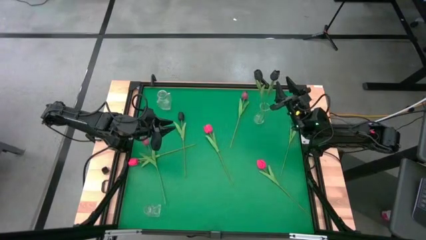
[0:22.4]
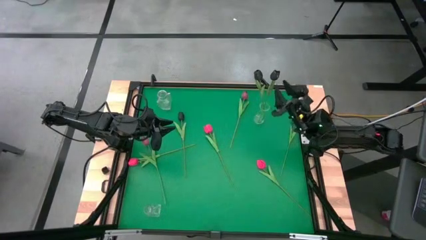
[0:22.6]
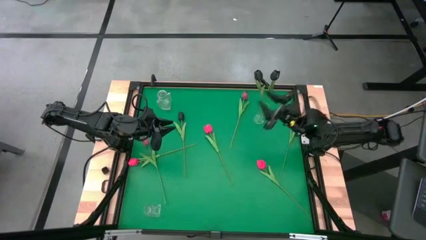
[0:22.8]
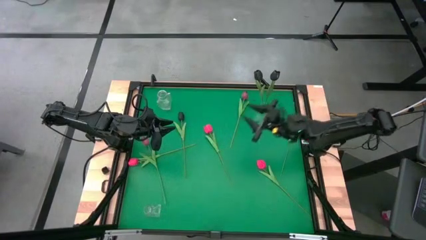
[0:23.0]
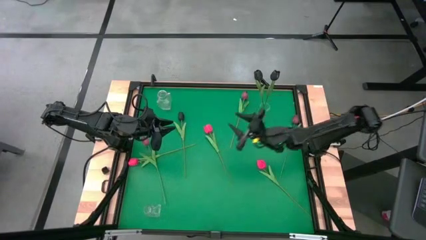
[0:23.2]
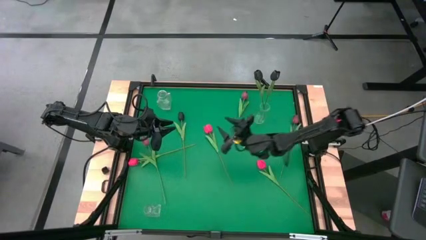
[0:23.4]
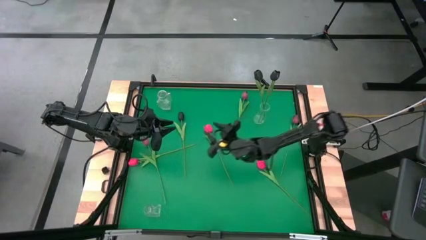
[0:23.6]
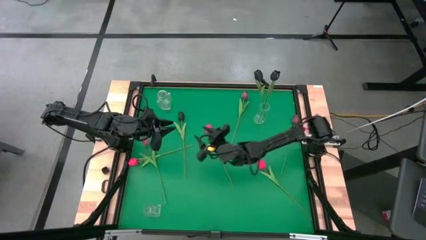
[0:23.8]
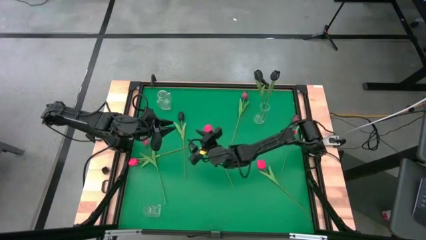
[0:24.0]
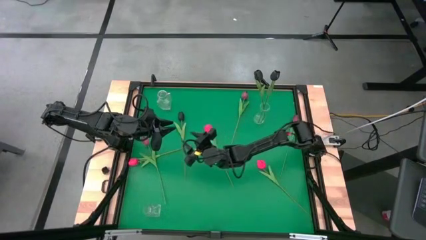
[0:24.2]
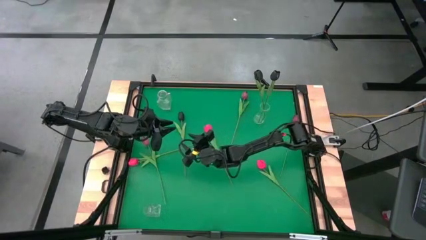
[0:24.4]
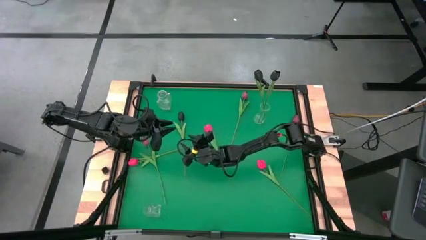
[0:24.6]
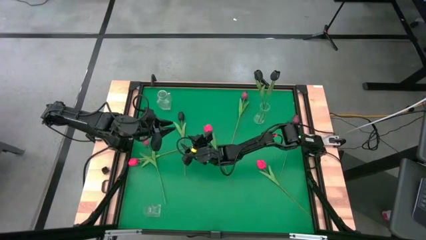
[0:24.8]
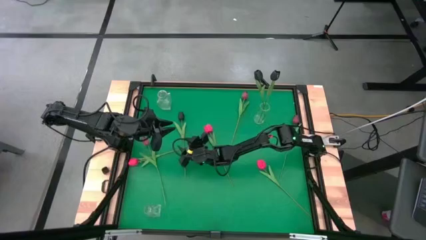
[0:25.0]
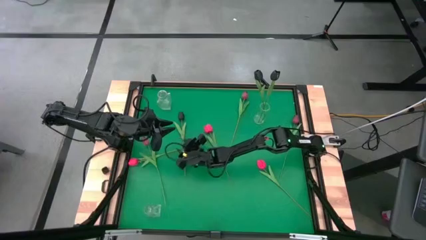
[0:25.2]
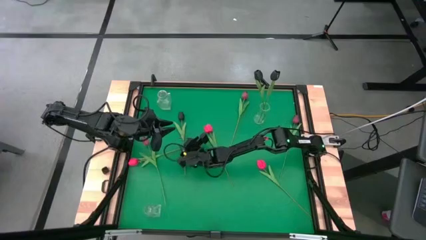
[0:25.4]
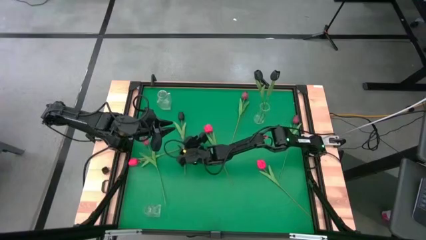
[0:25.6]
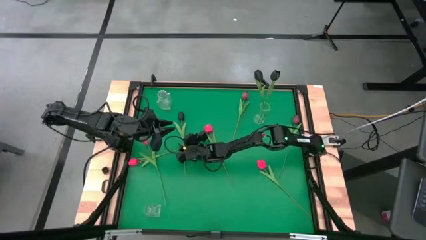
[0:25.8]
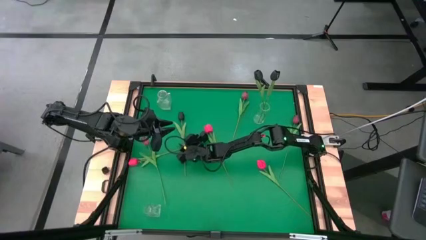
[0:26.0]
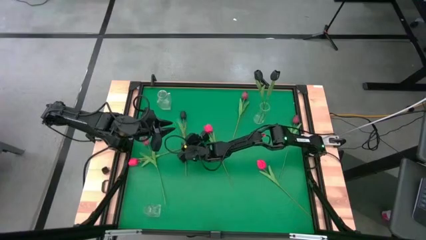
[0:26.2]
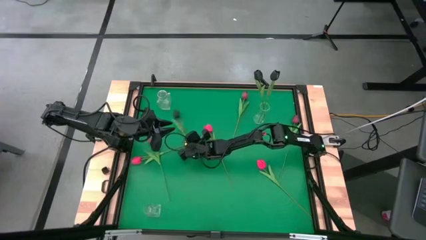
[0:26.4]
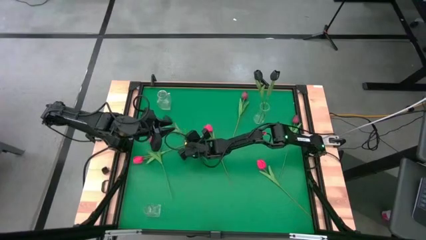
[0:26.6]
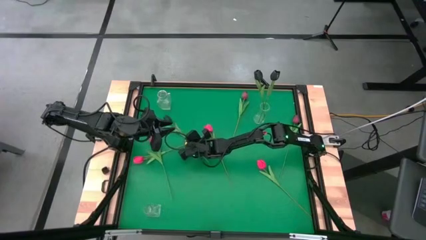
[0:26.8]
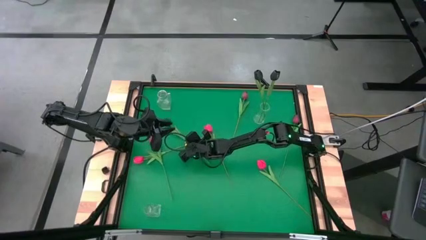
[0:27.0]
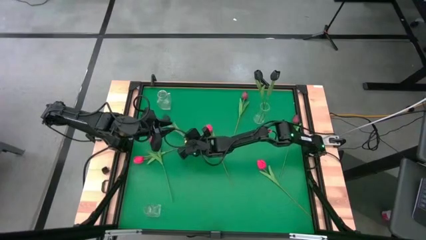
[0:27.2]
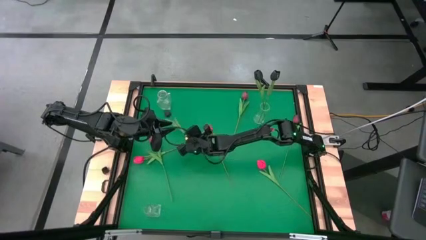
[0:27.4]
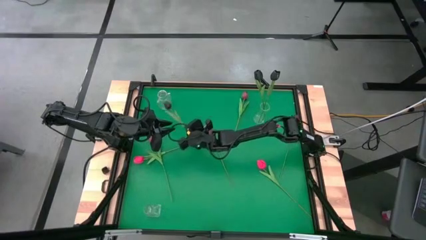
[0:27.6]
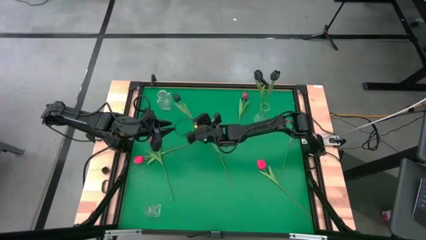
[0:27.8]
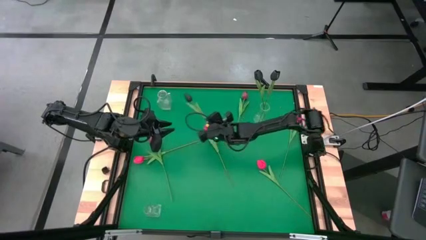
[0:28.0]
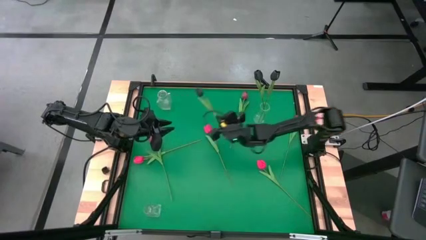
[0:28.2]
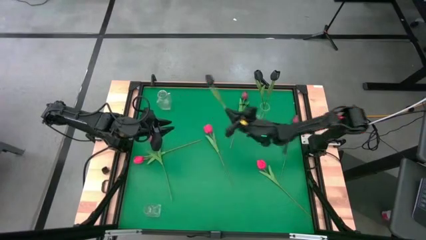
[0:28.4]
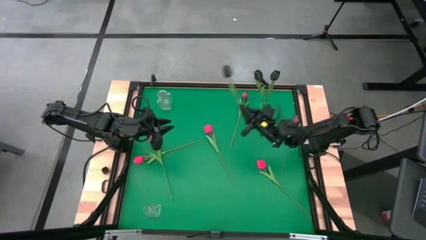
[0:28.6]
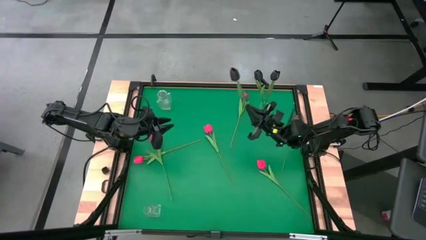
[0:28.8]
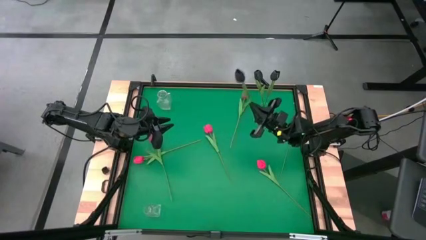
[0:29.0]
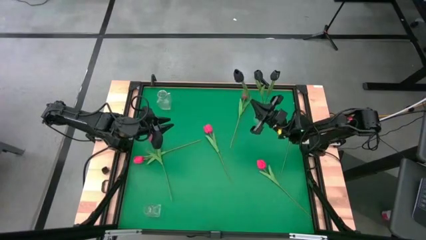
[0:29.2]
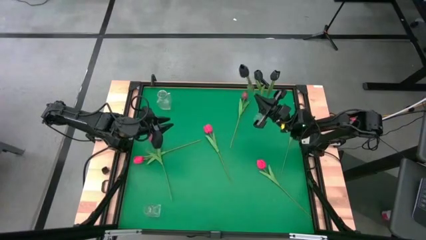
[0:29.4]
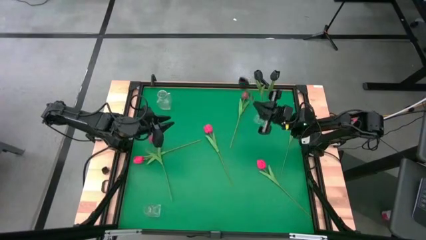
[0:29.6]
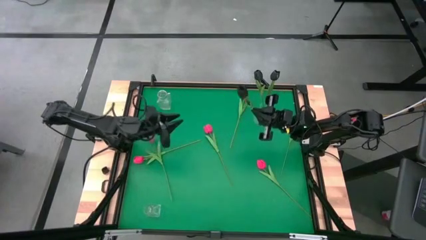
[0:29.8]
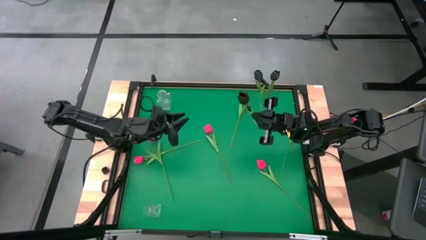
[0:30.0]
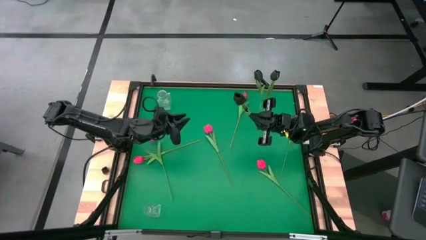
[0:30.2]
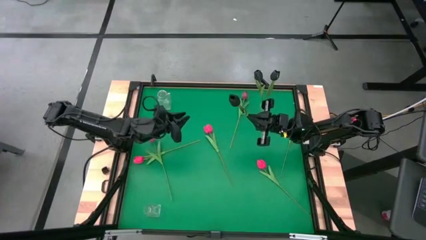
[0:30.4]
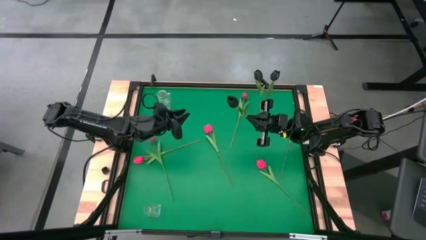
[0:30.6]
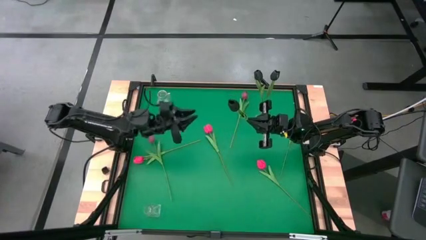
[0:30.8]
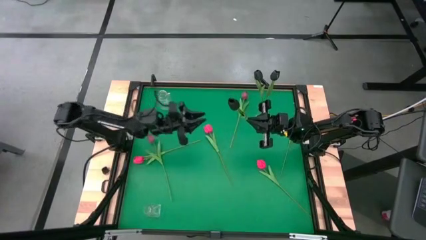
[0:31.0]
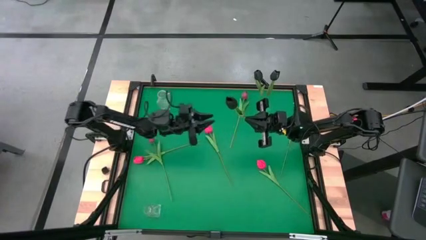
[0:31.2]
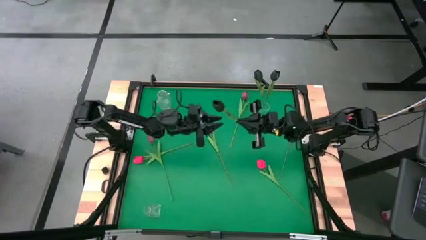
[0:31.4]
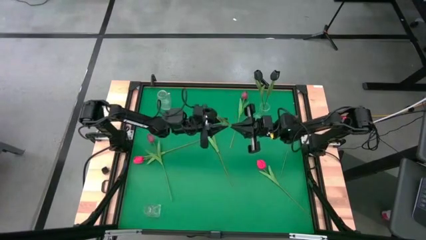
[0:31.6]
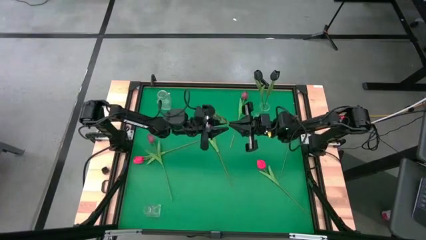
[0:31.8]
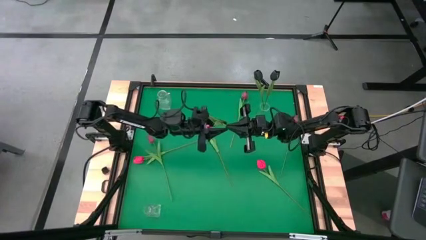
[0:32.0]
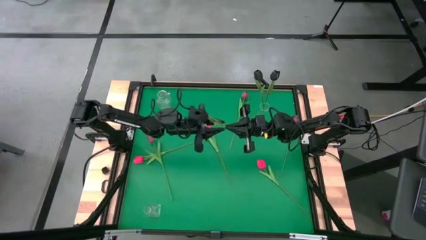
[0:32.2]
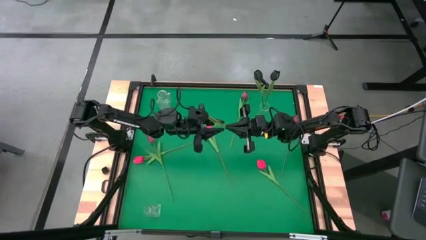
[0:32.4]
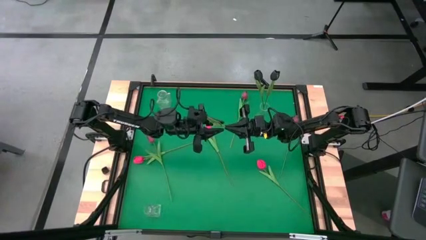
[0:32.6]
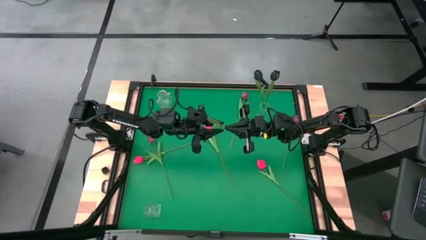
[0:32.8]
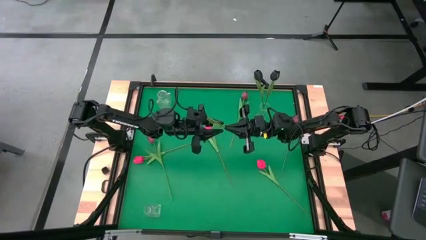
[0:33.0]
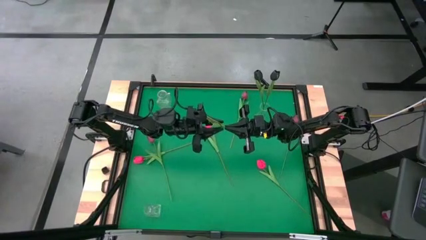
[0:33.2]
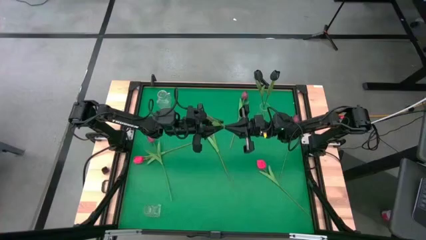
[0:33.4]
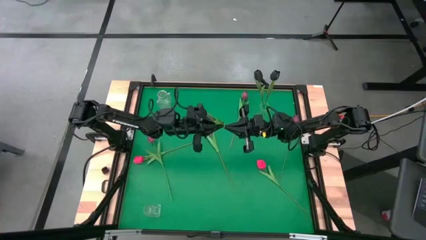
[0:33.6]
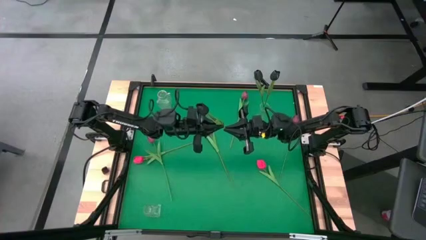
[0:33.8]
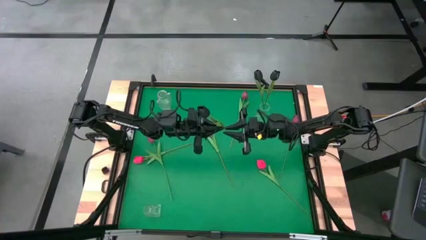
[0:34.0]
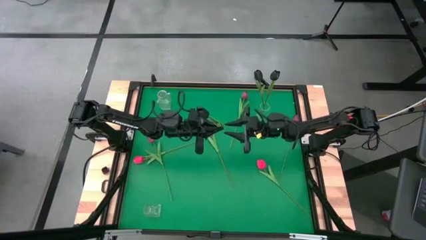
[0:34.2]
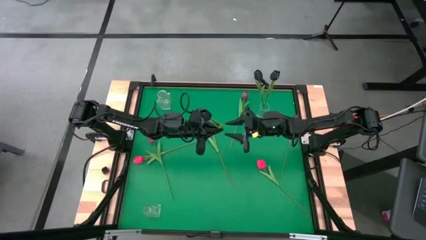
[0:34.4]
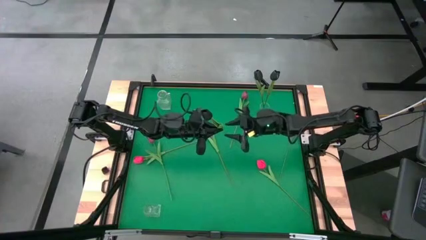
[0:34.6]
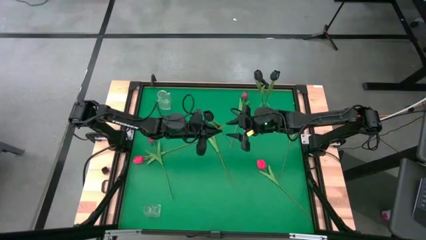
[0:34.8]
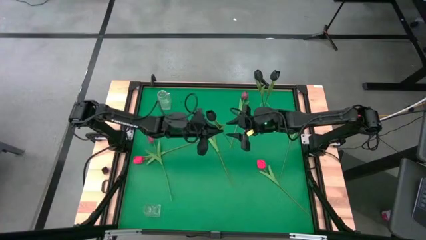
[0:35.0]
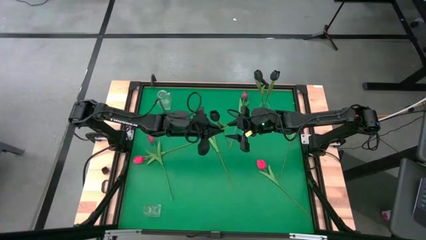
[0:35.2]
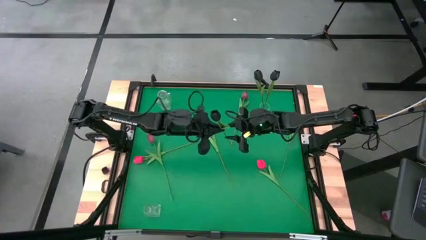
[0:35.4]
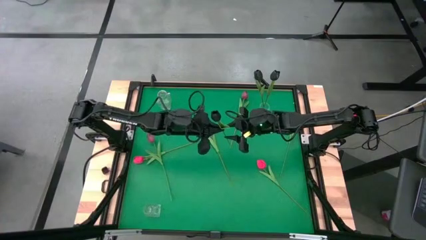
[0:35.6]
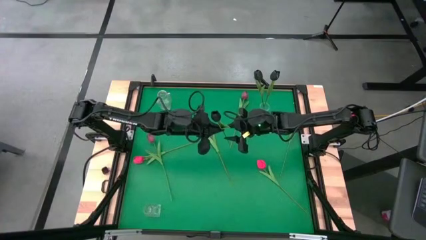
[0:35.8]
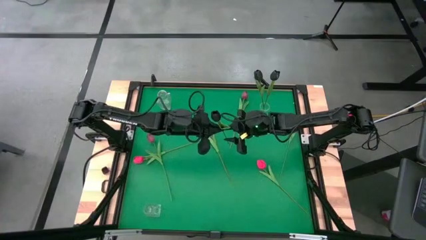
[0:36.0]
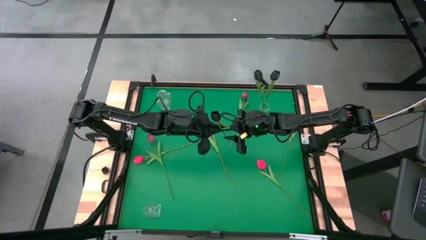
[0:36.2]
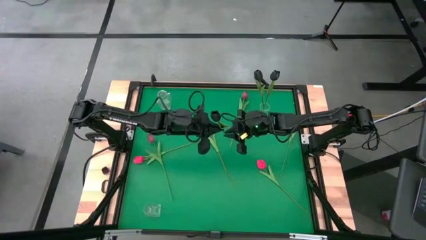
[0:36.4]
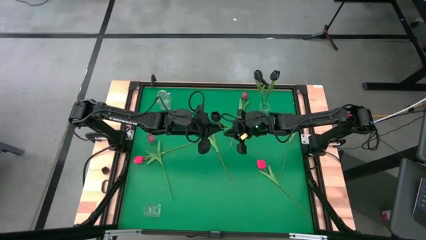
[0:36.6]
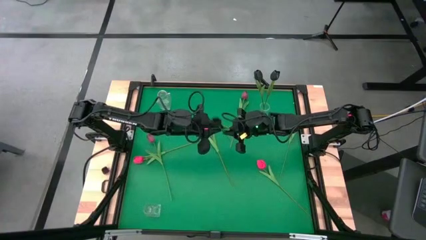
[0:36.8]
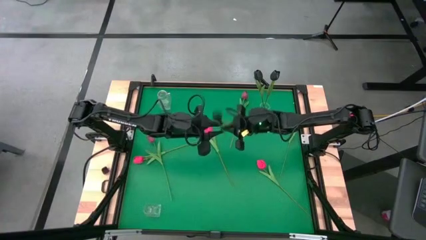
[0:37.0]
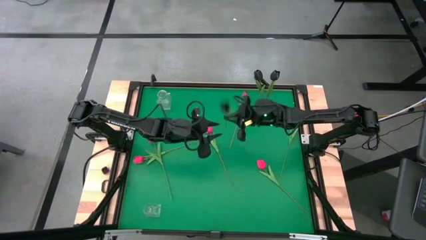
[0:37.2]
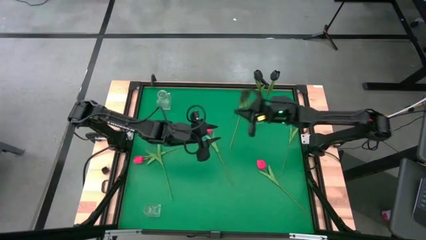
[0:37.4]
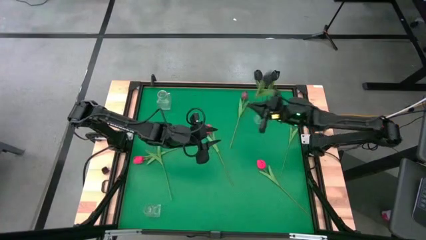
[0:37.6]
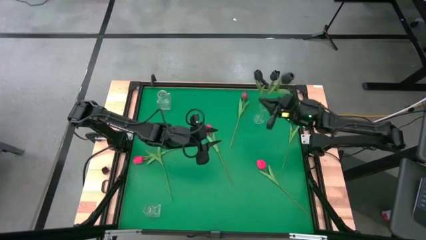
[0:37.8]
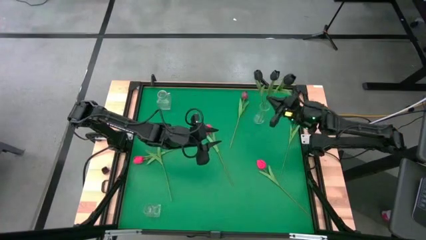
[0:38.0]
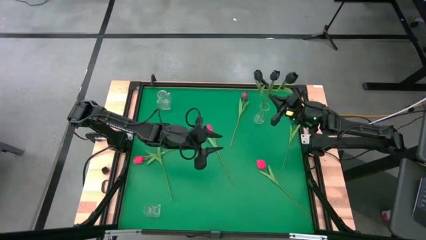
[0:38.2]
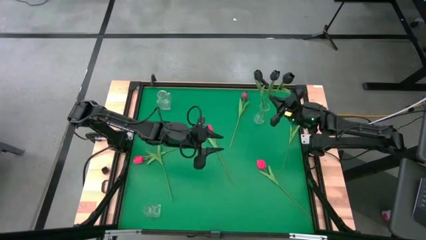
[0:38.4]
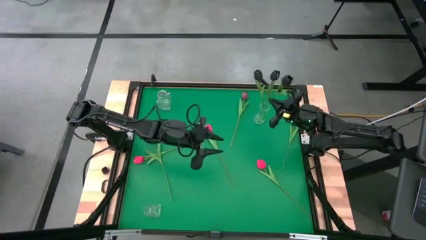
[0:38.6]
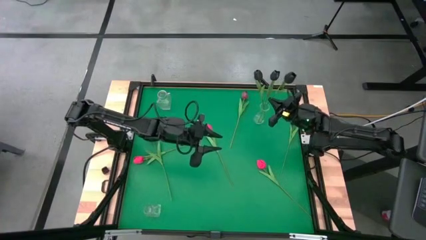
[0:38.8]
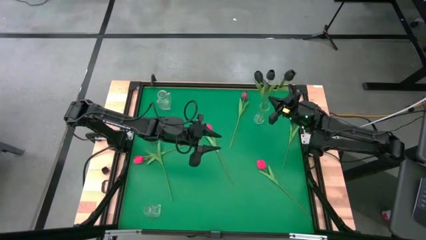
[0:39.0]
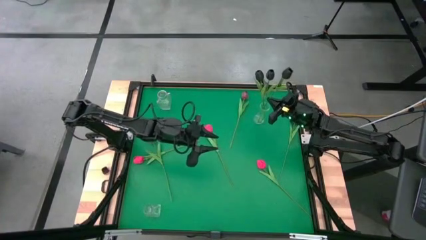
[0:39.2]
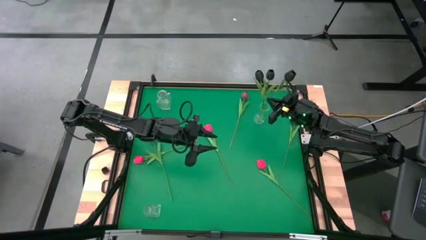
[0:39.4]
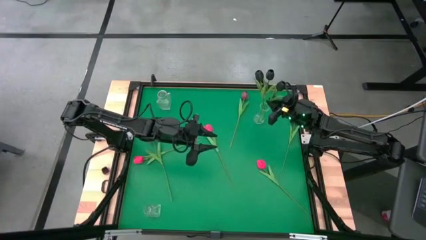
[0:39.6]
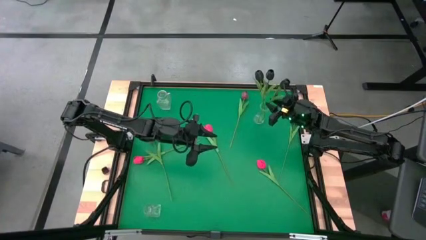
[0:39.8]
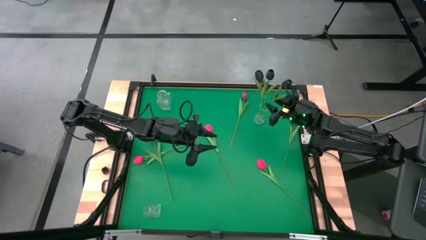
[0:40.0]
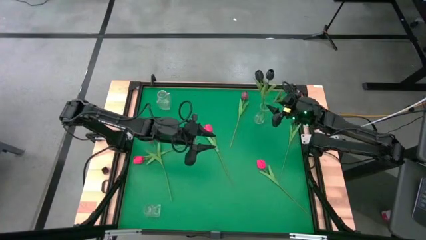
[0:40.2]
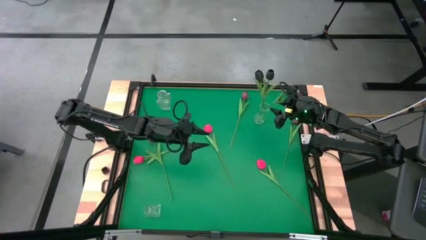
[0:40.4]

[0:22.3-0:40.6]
Task: Sort flowers into vase by color
Put the black flower into the top right transparent vase
